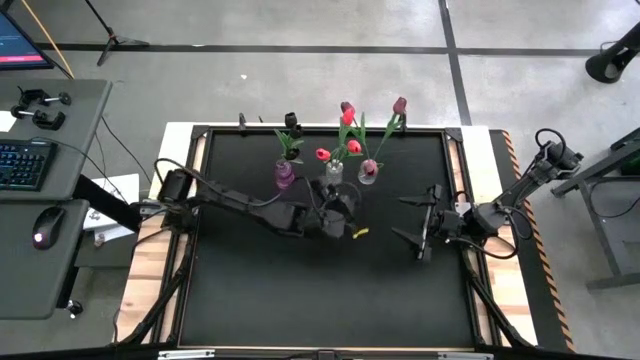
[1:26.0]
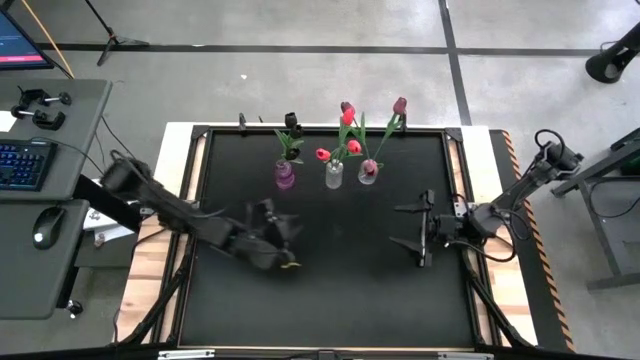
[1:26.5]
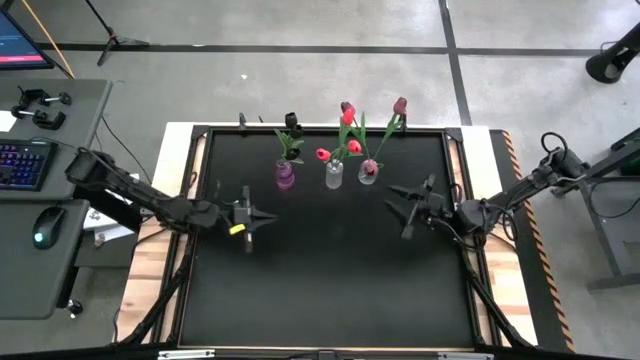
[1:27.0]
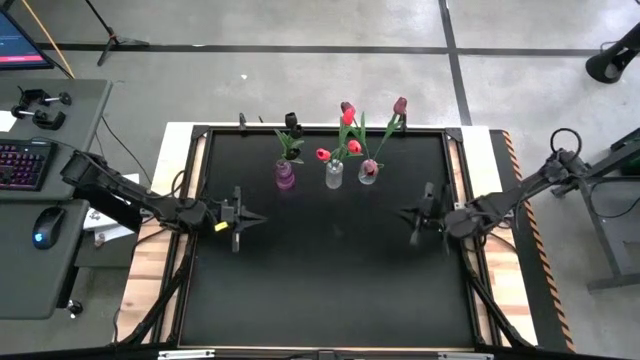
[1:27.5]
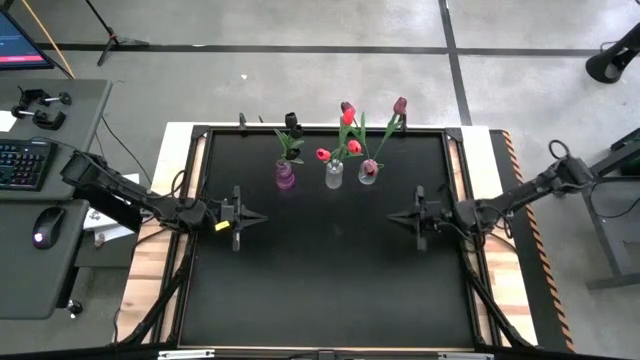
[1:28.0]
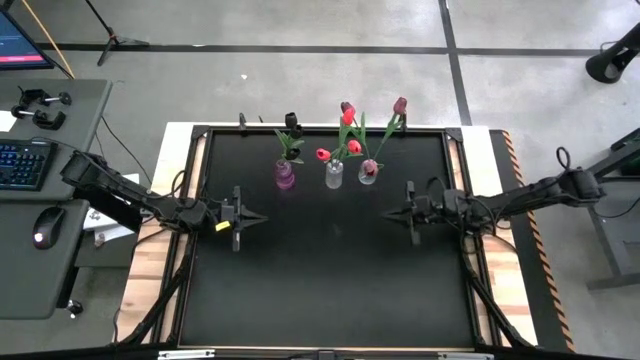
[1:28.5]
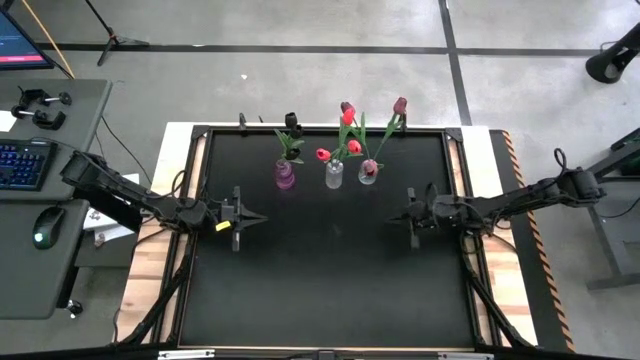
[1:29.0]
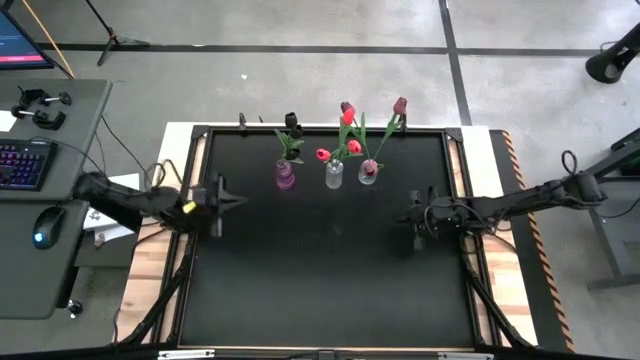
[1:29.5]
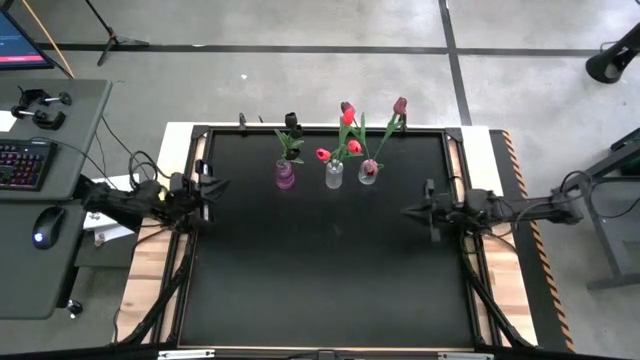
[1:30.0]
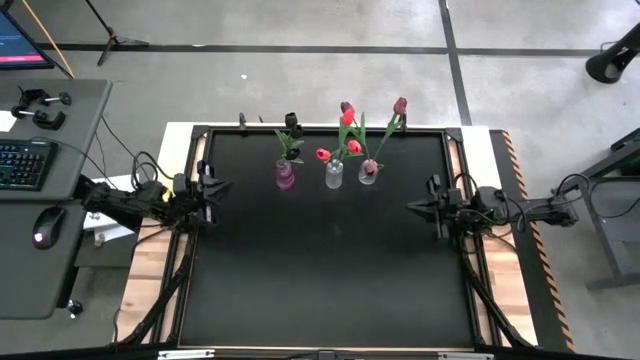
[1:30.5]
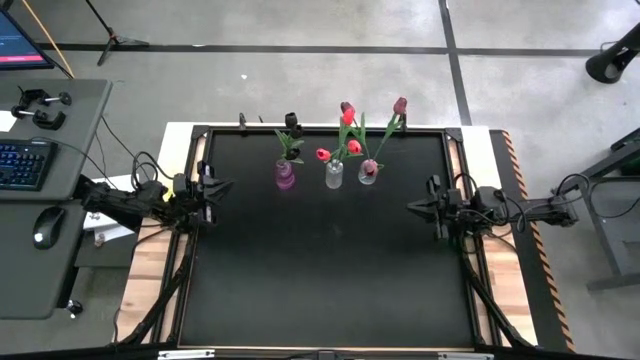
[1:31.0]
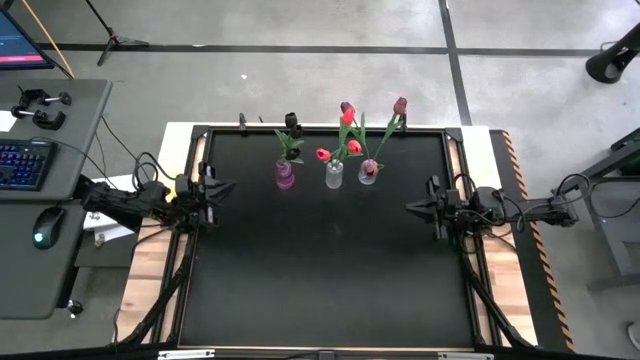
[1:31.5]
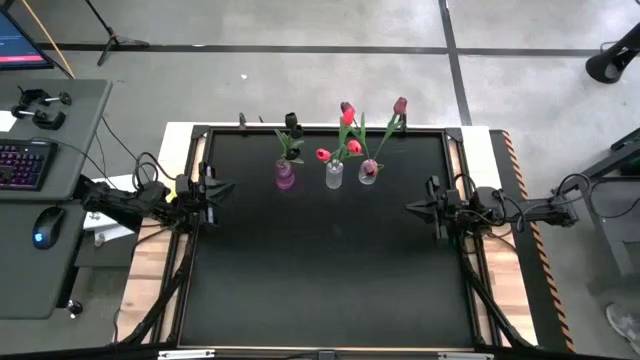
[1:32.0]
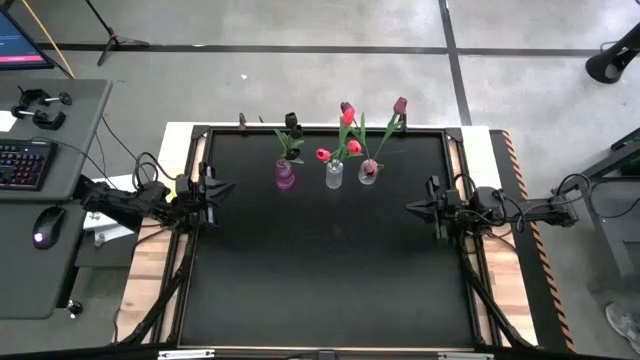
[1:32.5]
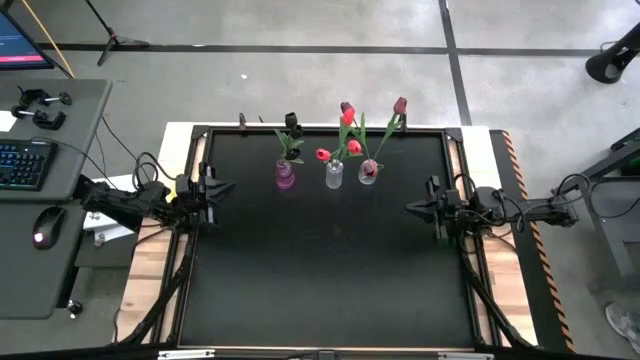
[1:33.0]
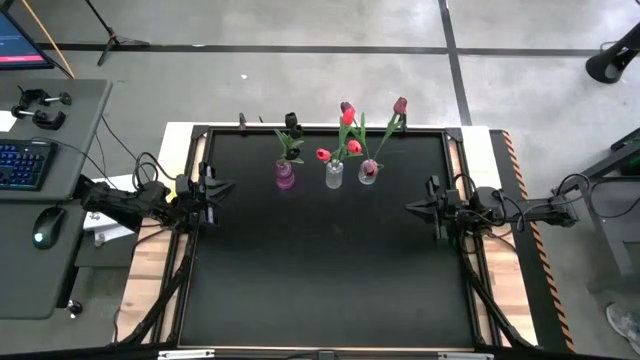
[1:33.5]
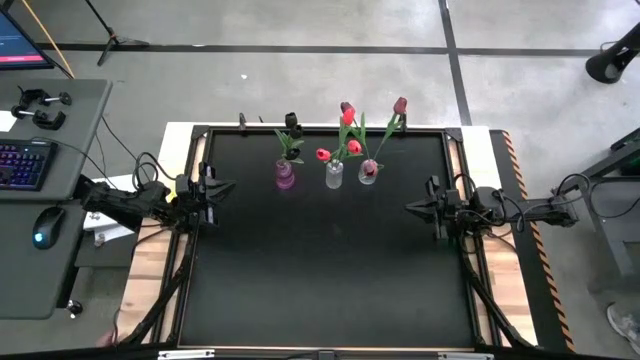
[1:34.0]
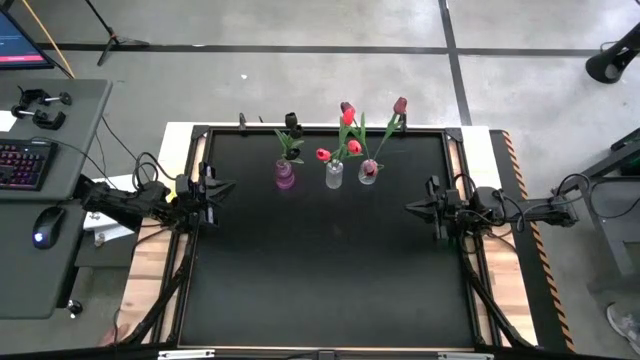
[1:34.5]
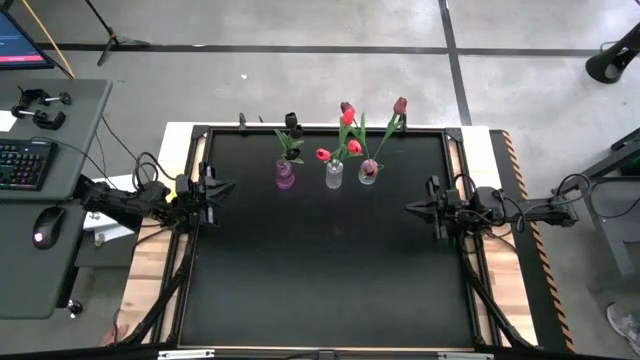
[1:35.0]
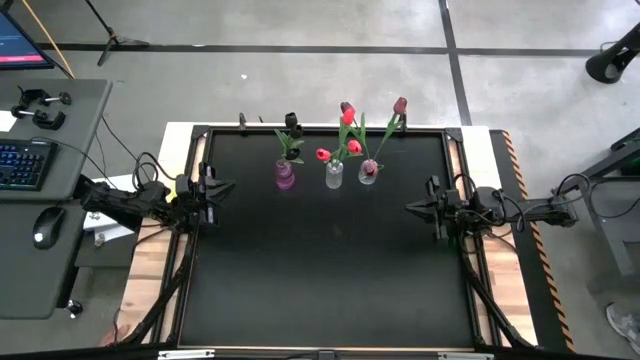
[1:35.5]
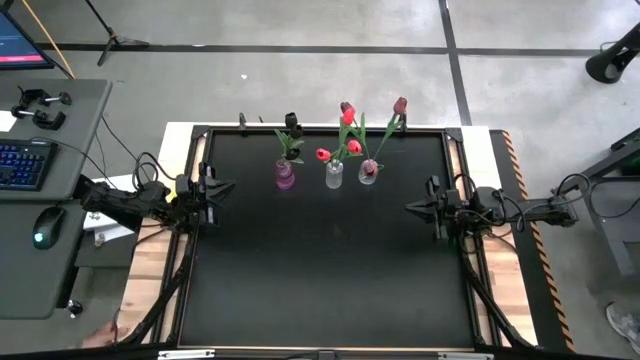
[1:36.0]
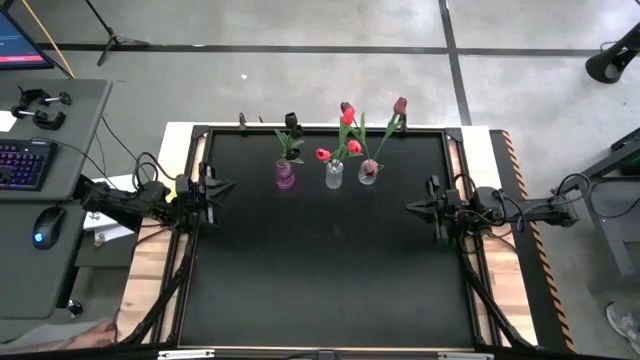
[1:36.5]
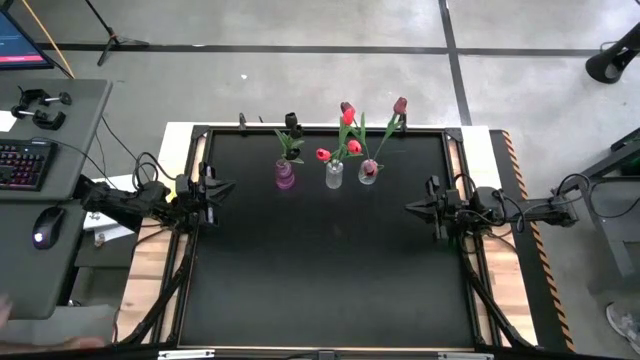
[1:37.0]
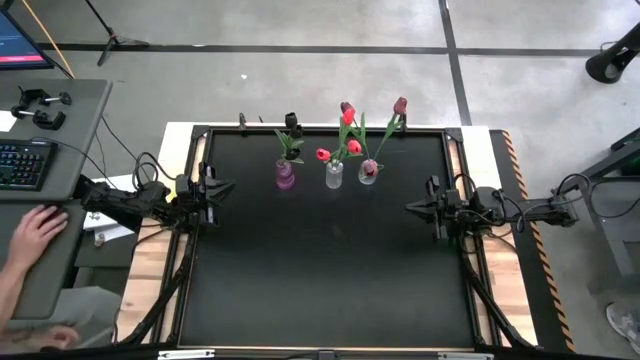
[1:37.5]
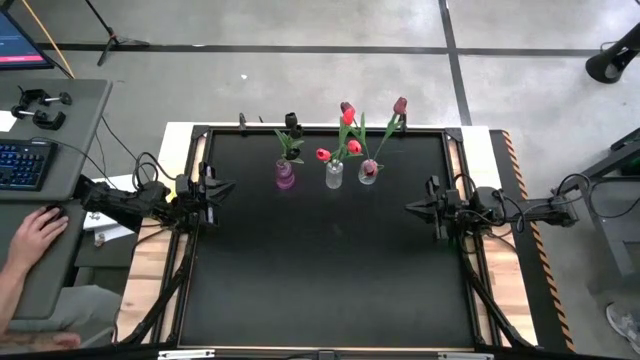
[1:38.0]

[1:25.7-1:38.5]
Task: Sort flowers into vase by color
Return to Home Position

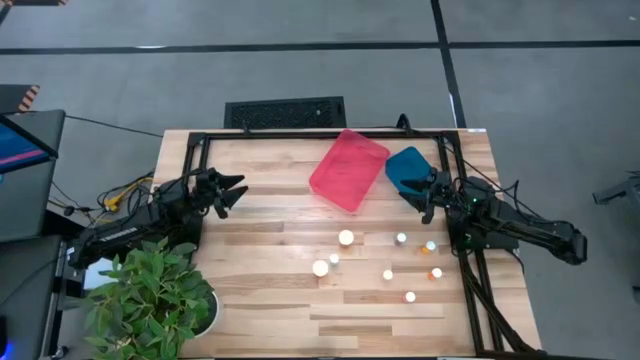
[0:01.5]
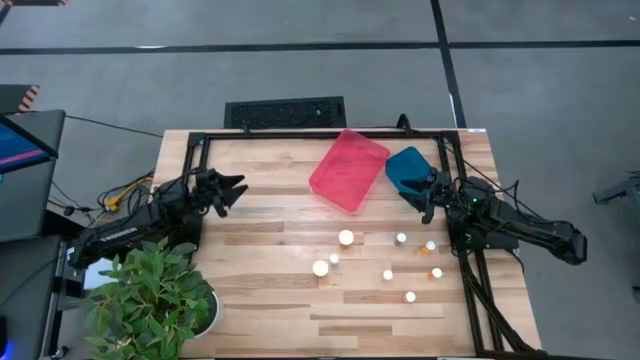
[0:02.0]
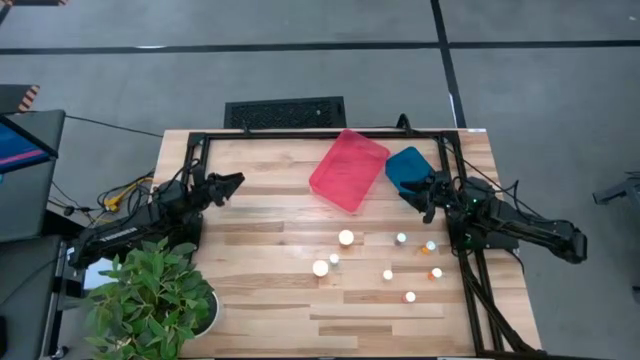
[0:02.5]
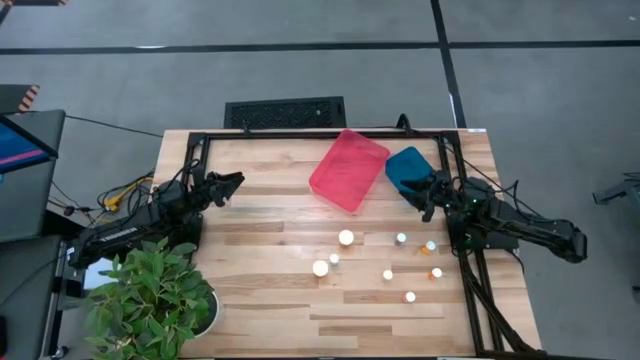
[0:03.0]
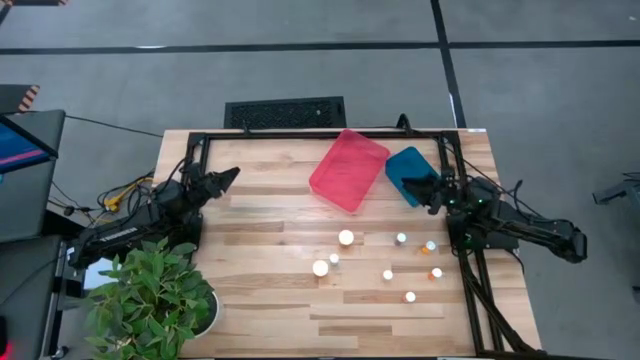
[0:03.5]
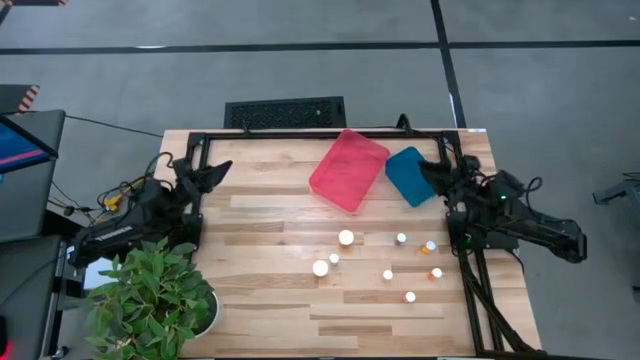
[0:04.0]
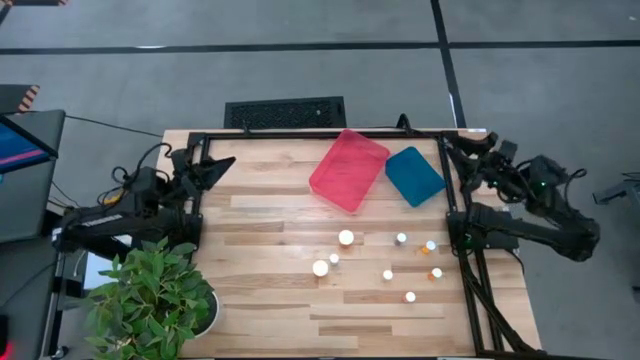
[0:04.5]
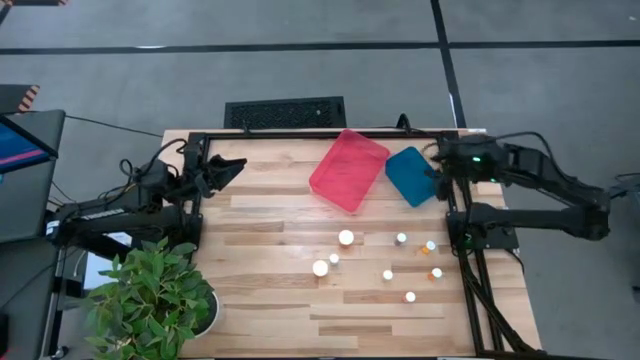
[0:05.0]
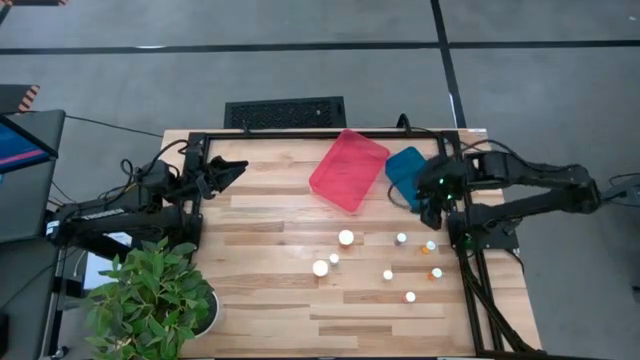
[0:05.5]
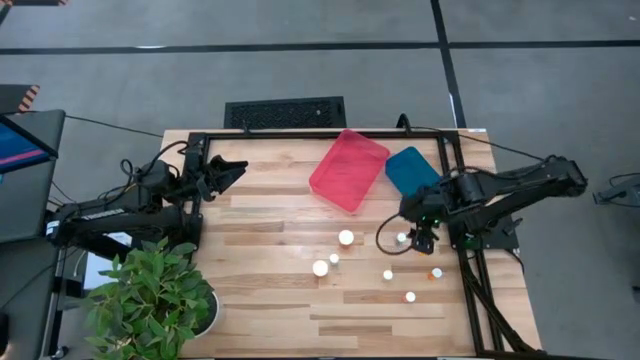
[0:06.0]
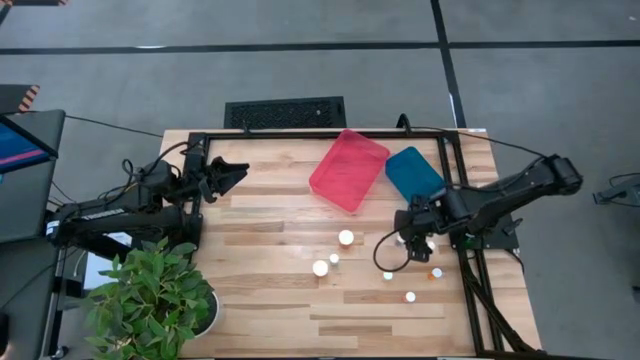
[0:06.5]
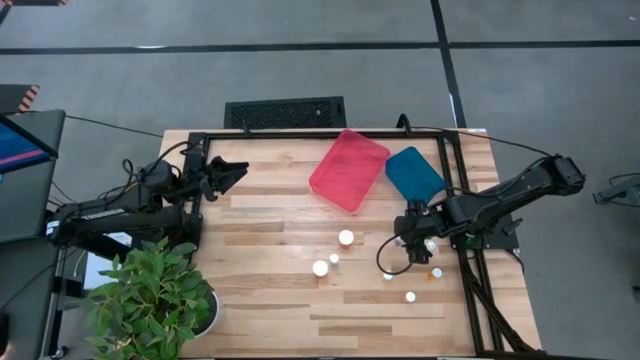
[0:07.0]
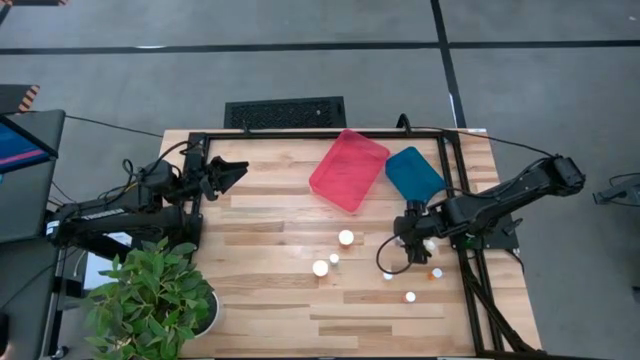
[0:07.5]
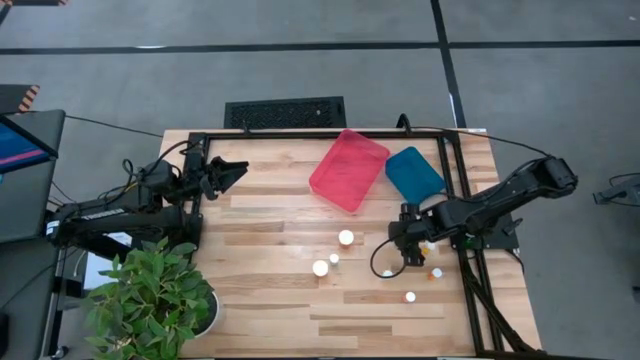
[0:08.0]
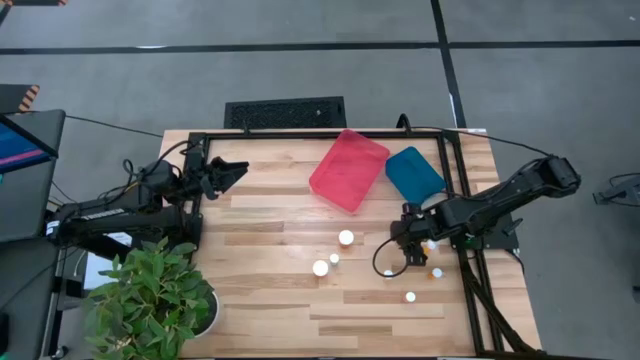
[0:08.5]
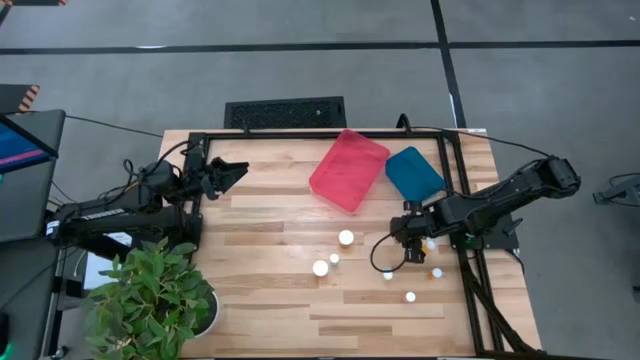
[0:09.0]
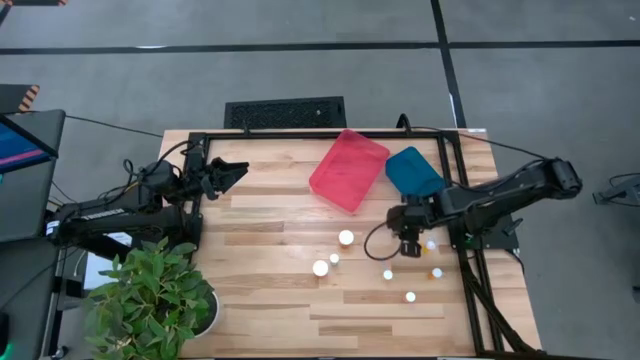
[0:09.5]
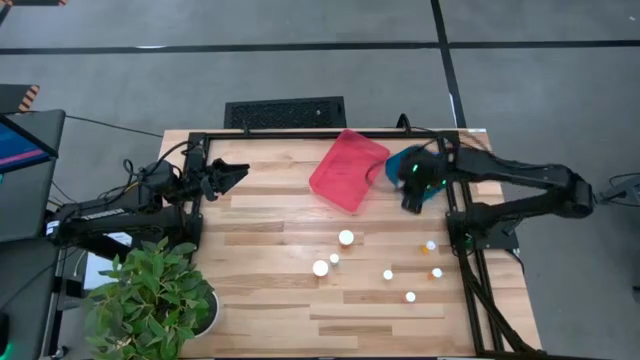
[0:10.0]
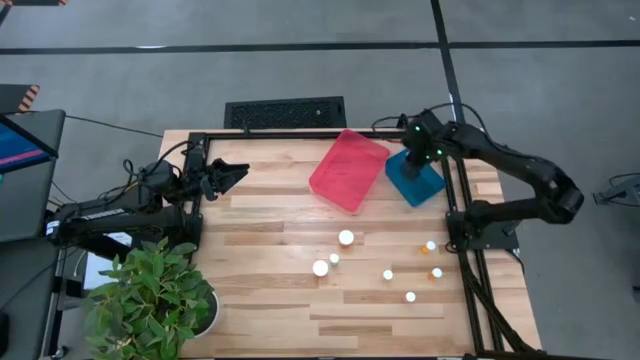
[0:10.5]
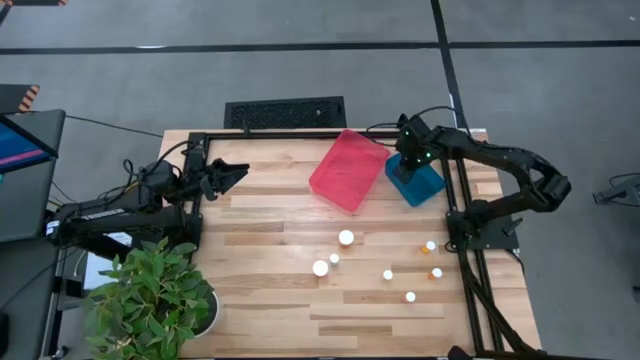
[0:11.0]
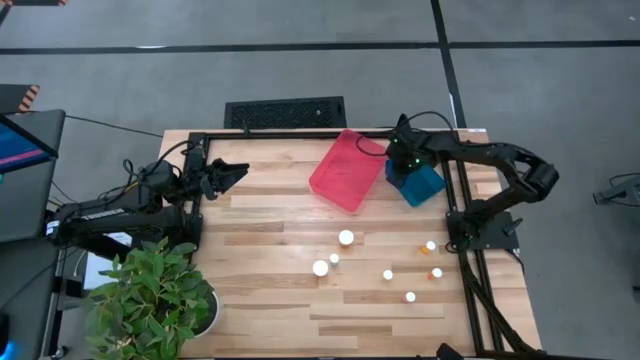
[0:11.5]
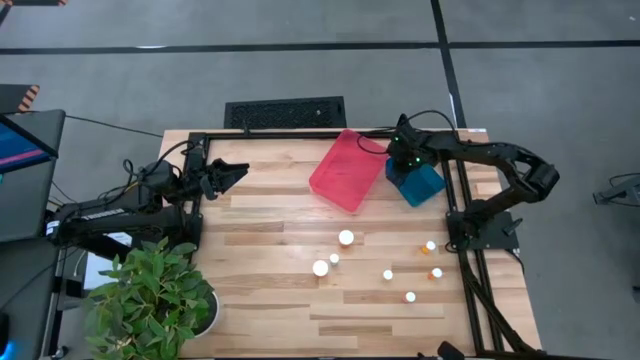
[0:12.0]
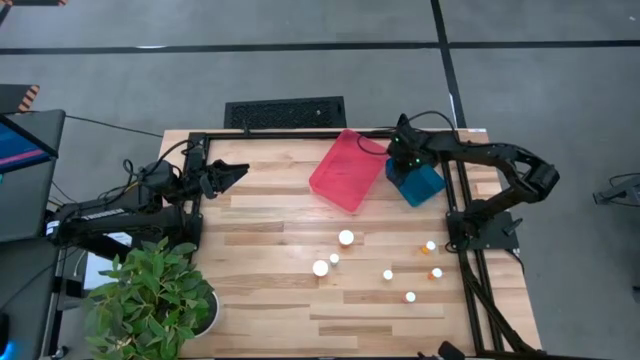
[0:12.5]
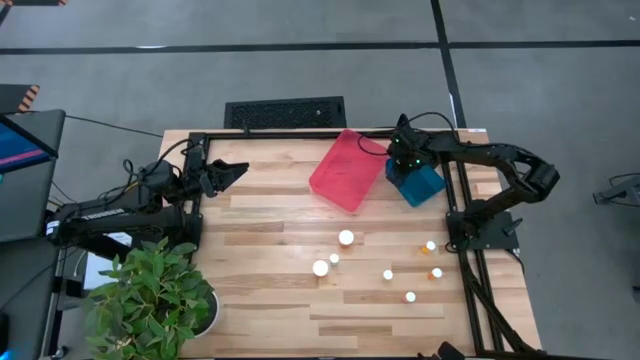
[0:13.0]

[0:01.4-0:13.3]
Task: Pick and place medicine bottles into bin by pill shape (circle, oval)
Put the blue capsule bottle into the blue bin
